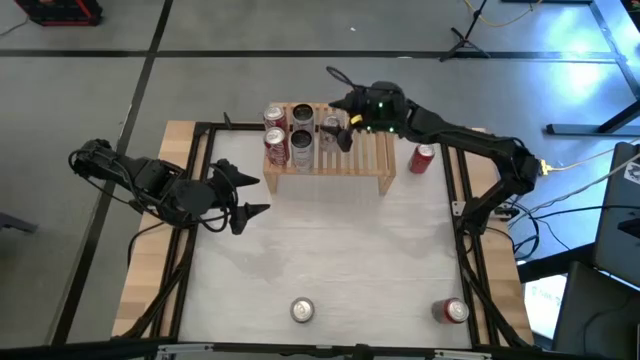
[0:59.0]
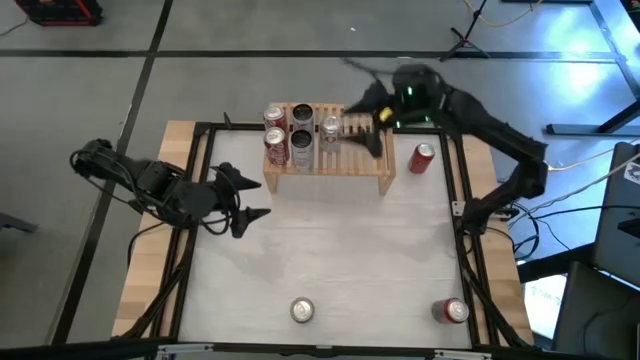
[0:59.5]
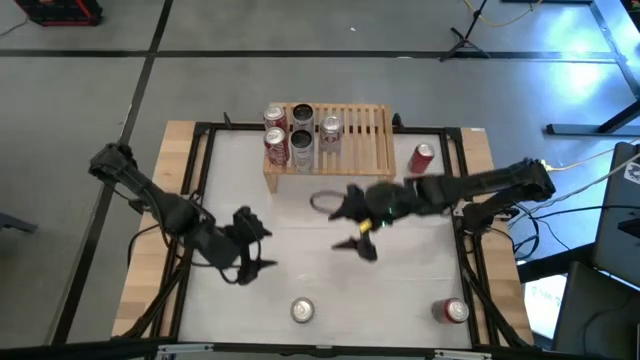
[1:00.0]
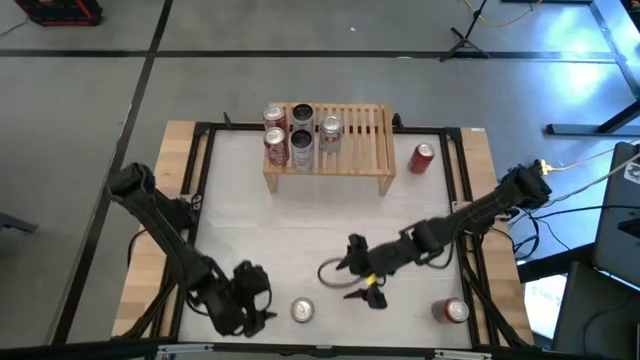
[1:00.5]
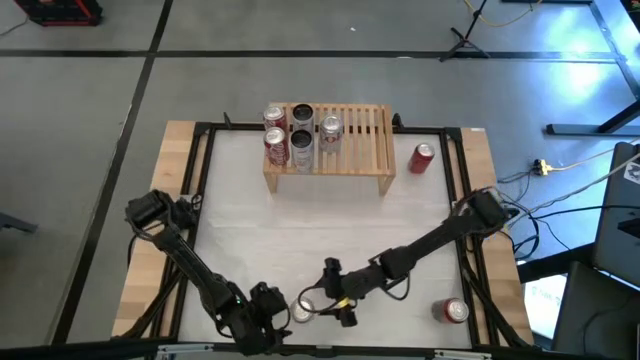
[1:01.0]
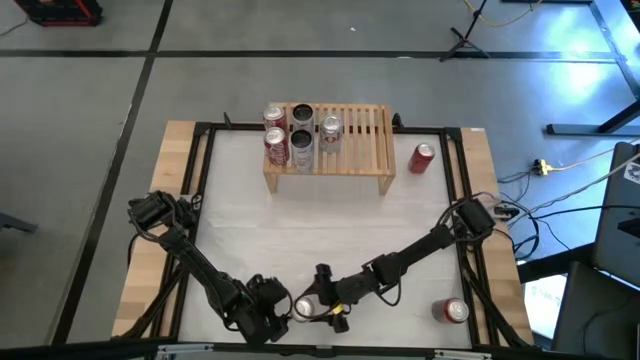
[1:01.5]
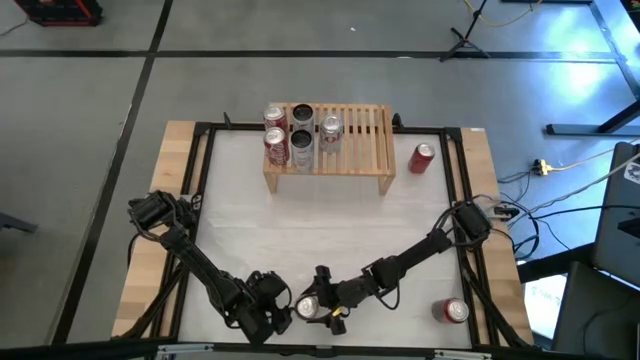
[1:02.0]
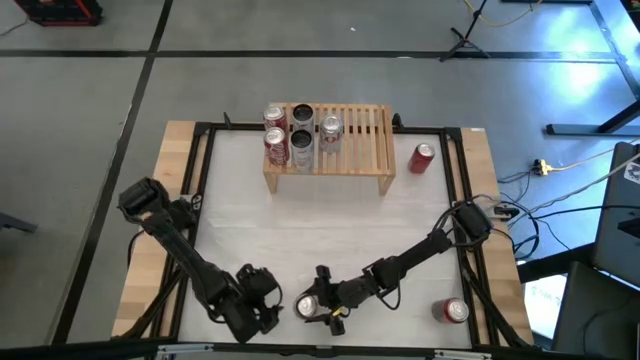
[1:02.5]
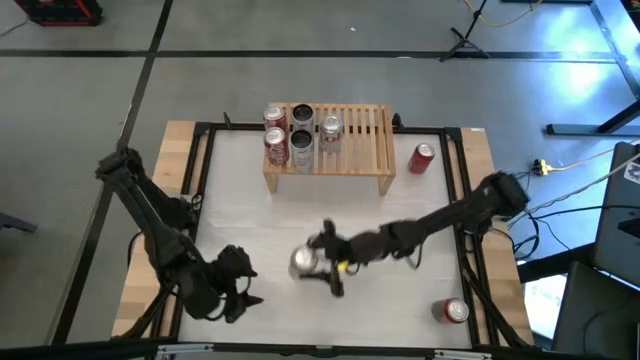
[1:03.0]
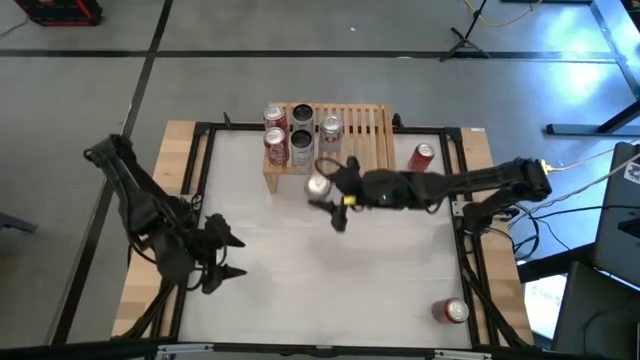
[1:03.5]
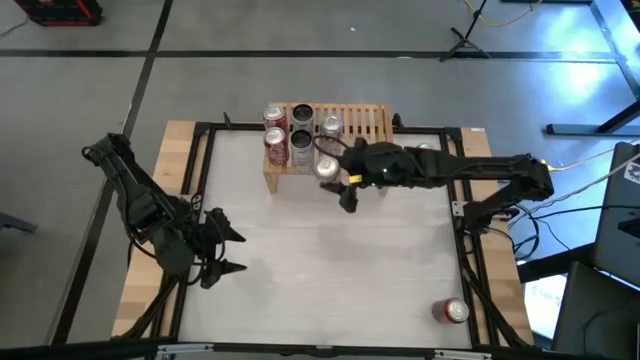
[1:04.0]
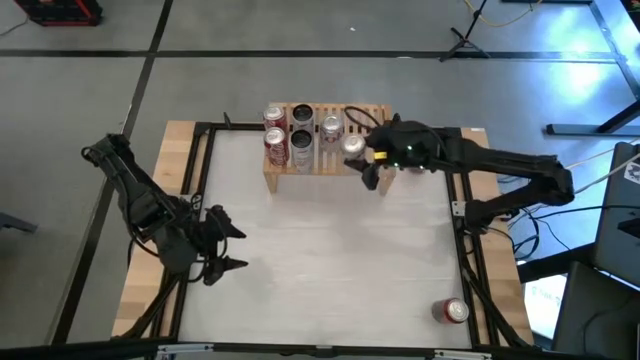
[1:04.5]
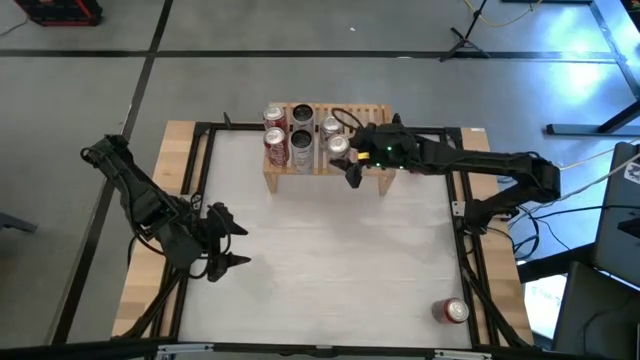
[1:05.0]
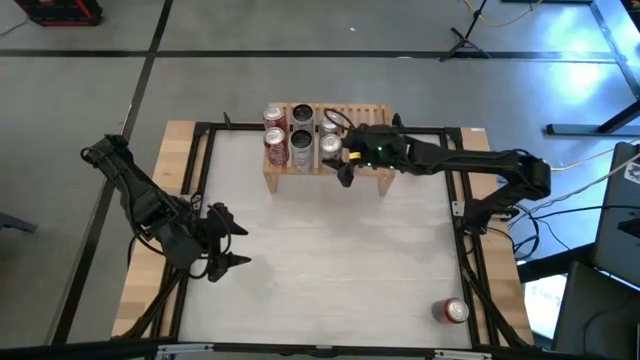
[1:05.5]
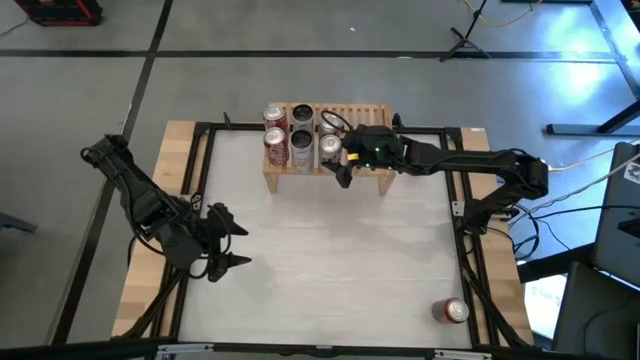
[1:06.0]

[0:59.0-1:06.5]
Task: Place canned beverage on shelf
Put the white soda can on the shelf aligned with the other white soda can

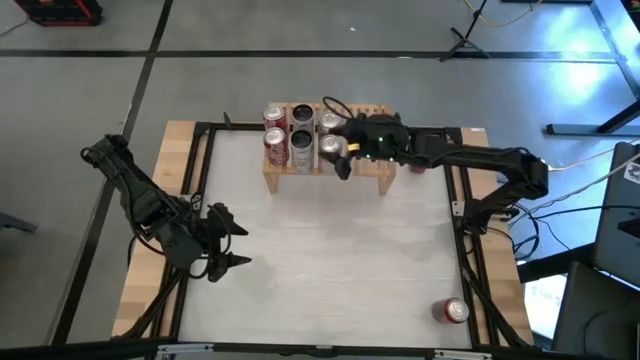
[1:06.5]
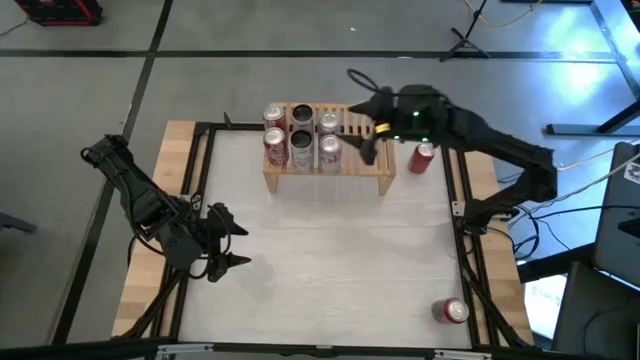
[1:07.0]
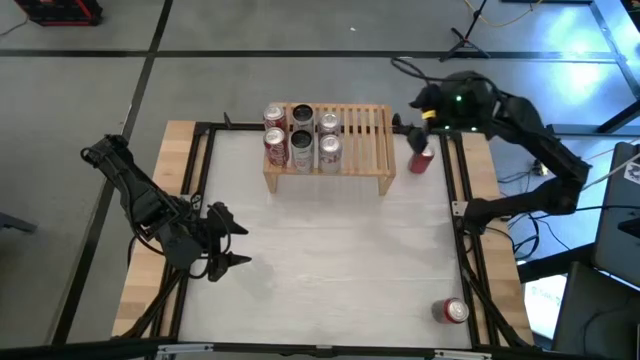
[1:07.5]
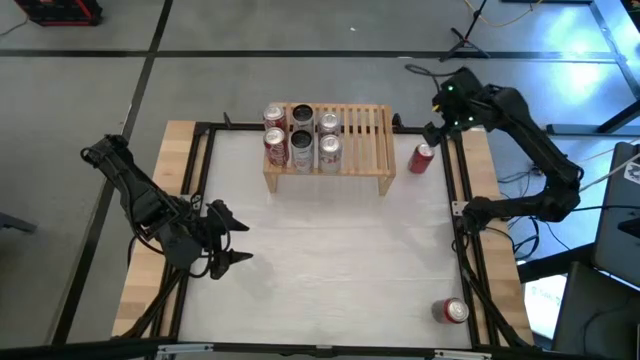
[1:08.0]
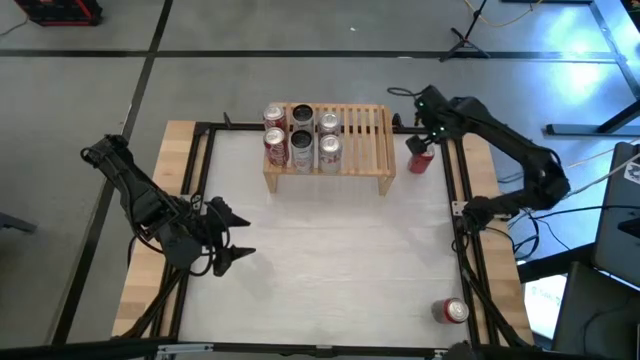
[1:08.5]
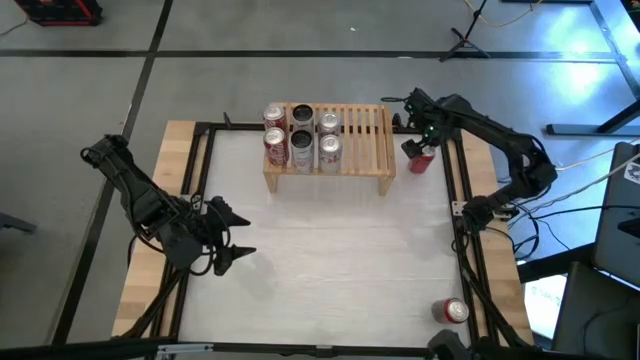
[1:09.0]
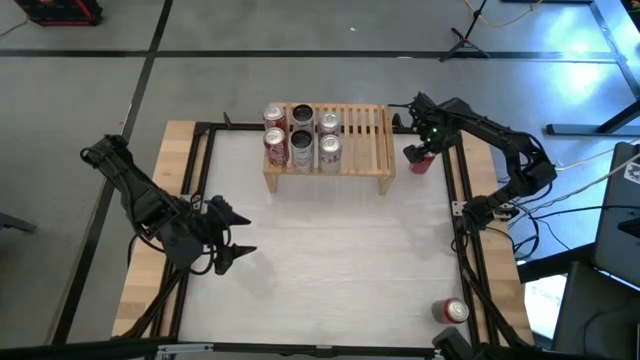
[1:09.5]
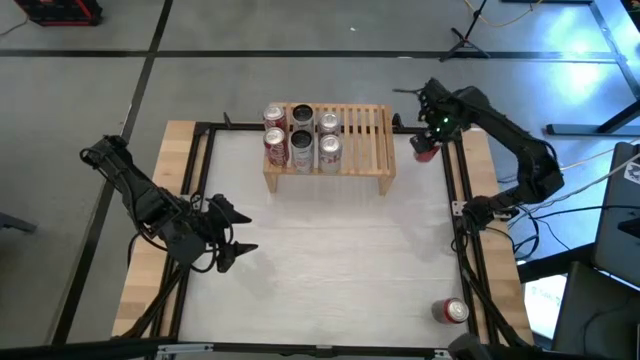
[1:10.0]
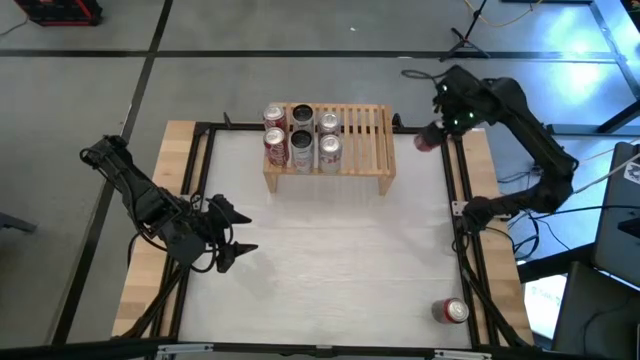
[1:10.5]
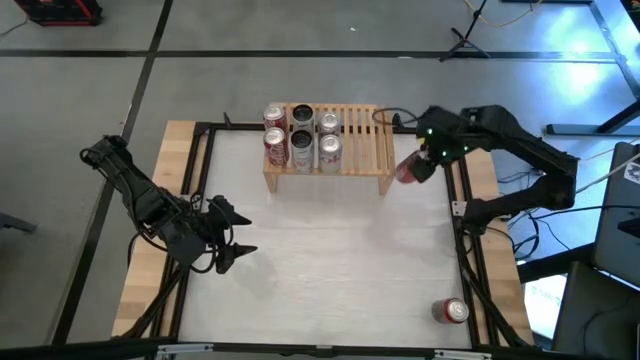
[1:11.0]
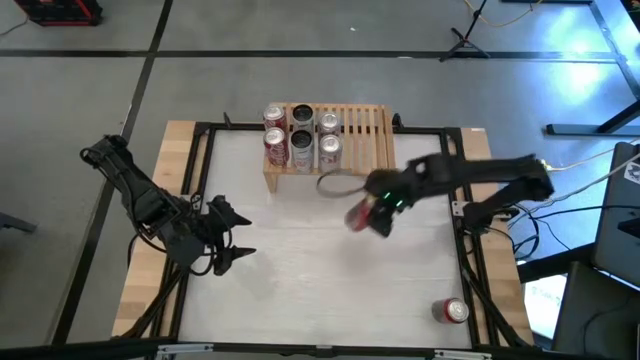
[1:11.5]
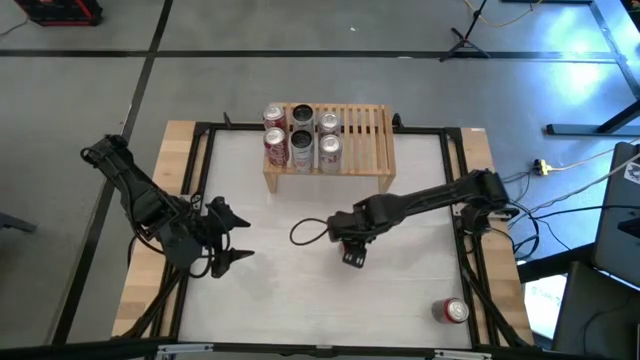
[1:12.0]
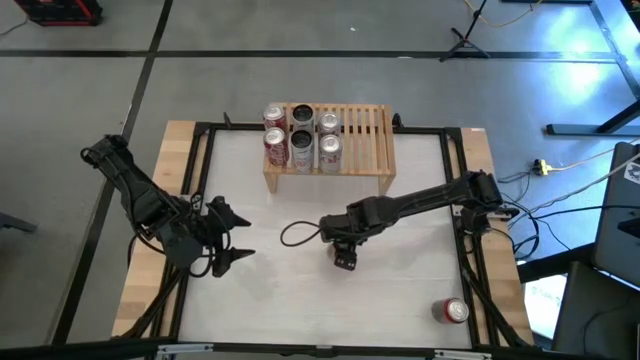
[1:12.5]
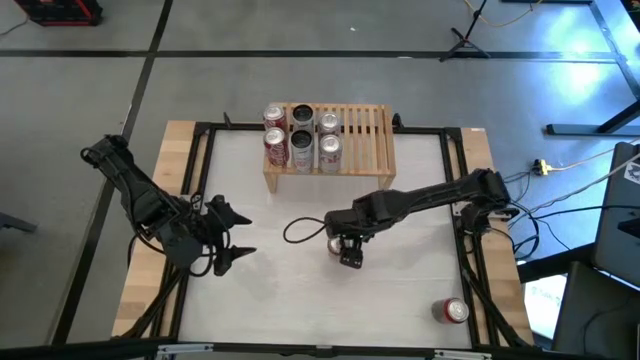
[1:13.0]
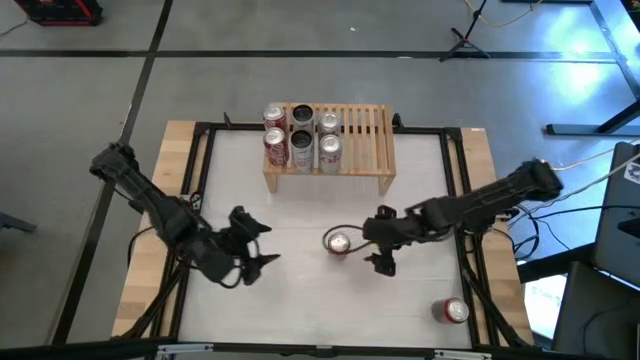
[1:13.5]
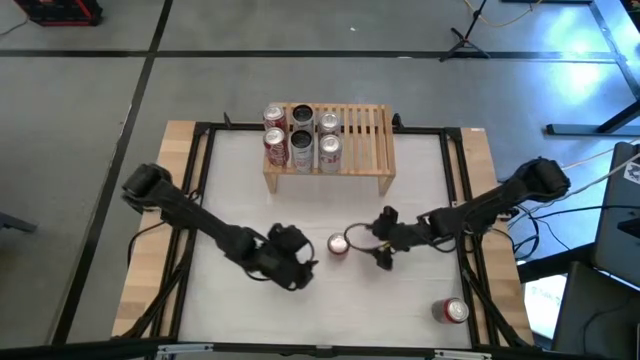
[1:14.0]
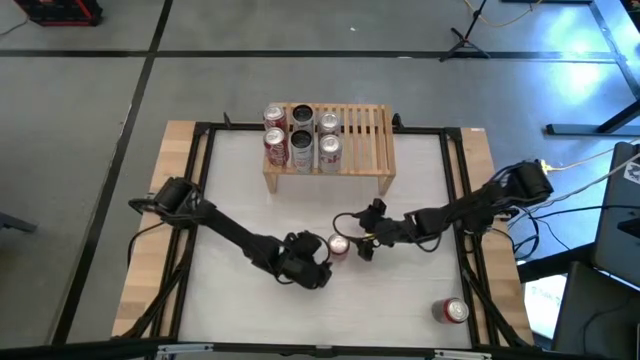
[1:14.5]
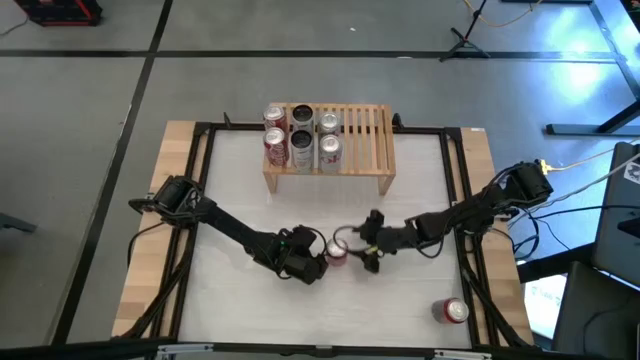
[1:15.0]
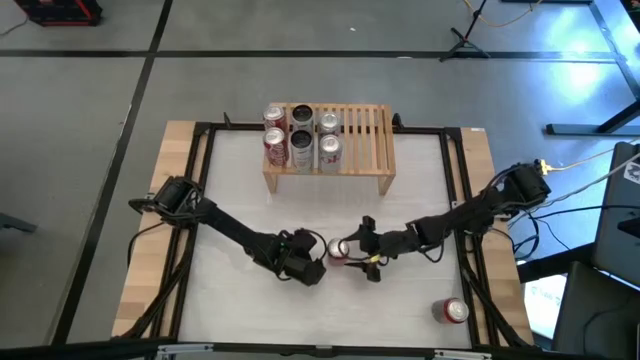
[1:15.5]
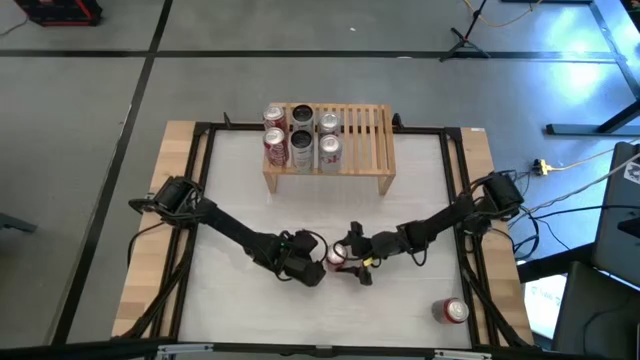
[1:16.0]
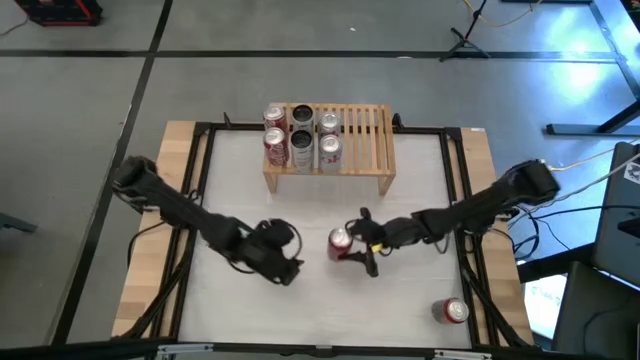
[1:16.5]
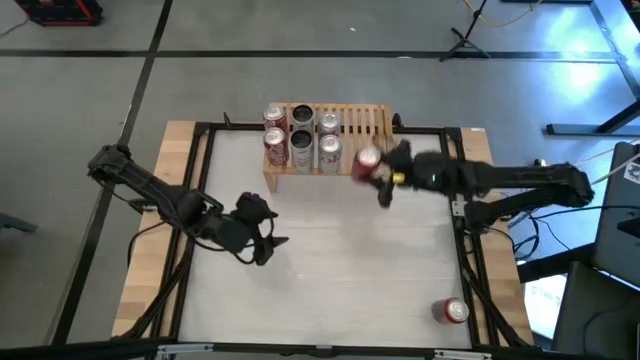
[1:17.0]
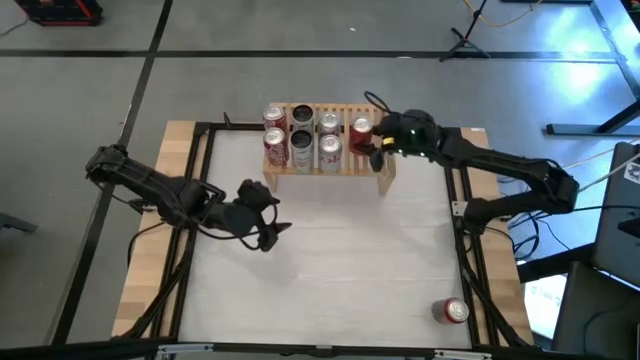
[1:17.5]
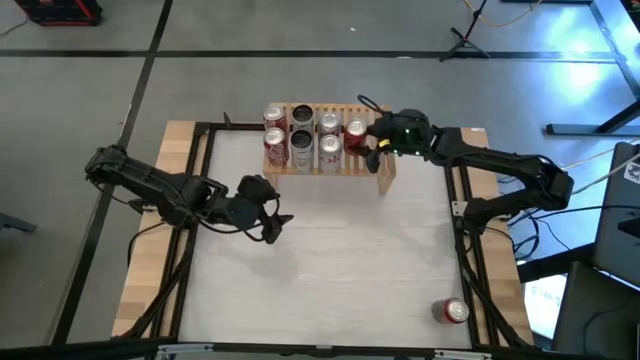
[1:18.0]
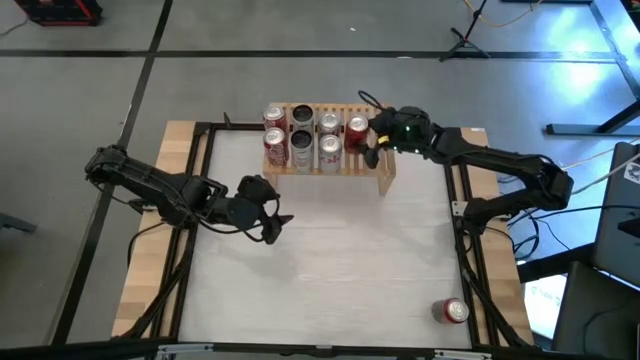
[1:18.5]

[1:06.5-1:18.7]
Put the top dark red soda can on the shelf
